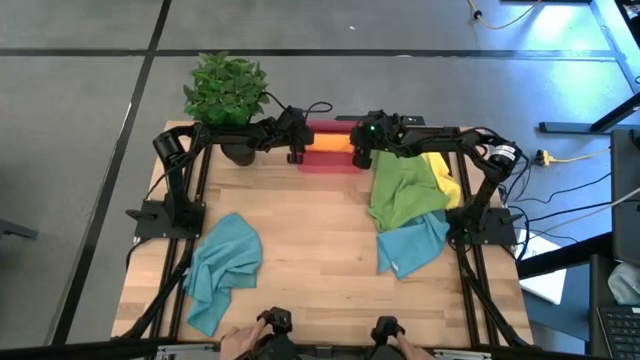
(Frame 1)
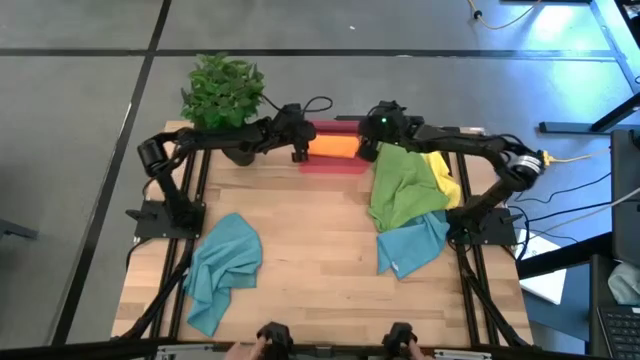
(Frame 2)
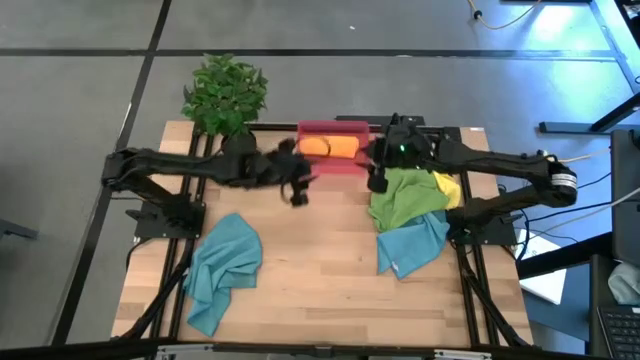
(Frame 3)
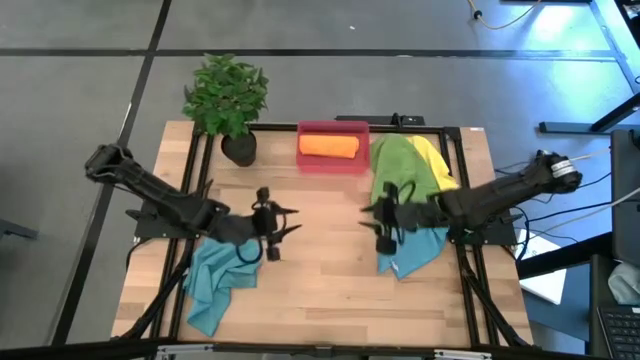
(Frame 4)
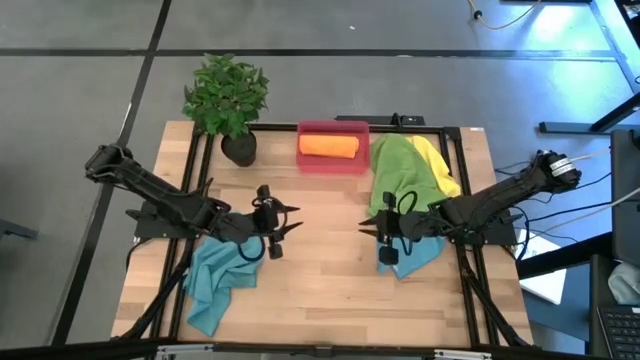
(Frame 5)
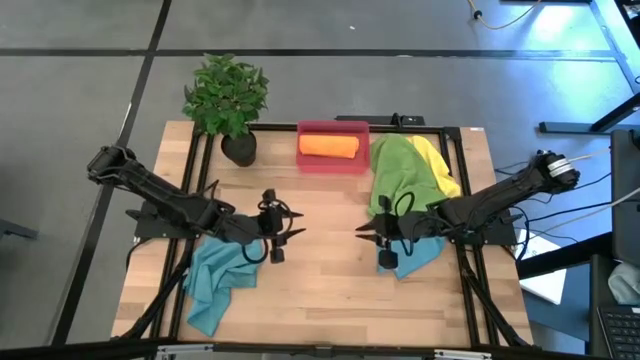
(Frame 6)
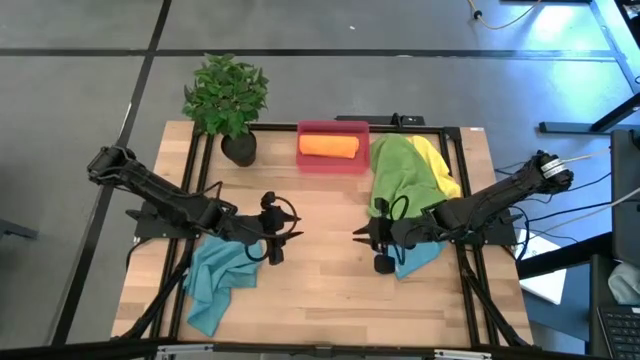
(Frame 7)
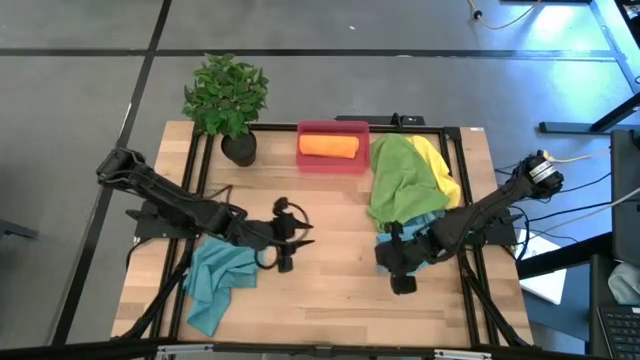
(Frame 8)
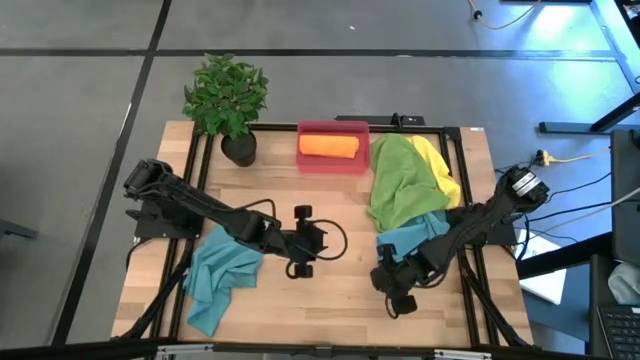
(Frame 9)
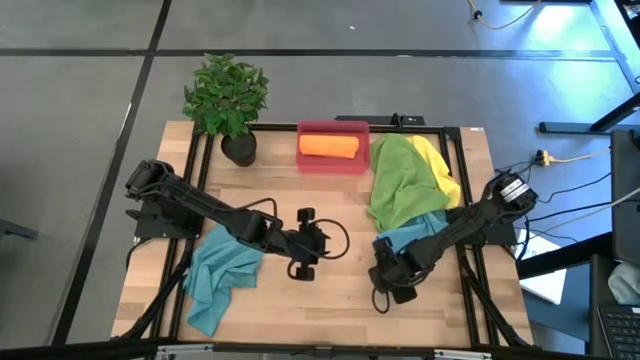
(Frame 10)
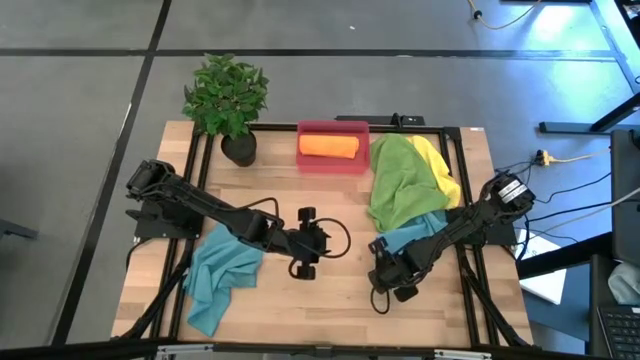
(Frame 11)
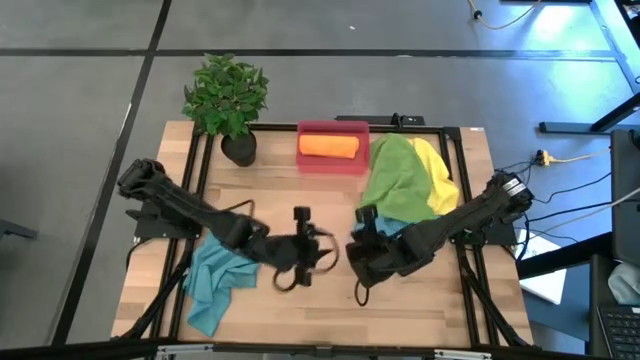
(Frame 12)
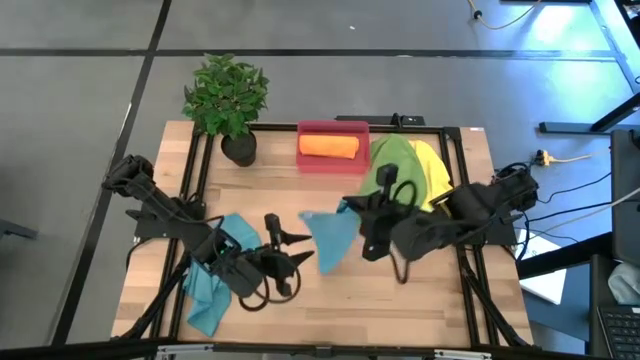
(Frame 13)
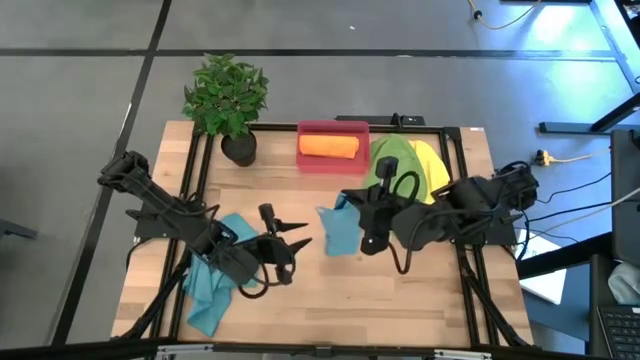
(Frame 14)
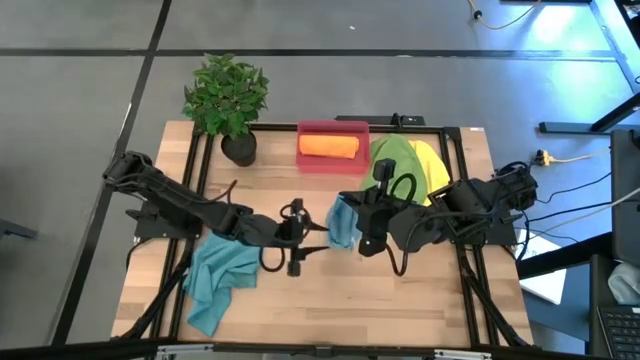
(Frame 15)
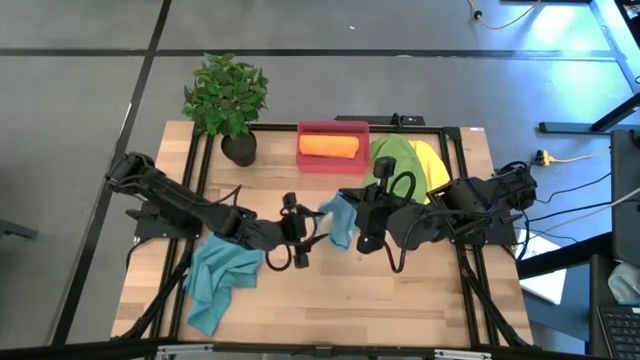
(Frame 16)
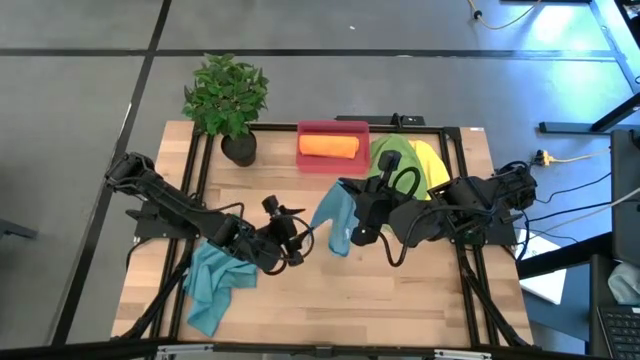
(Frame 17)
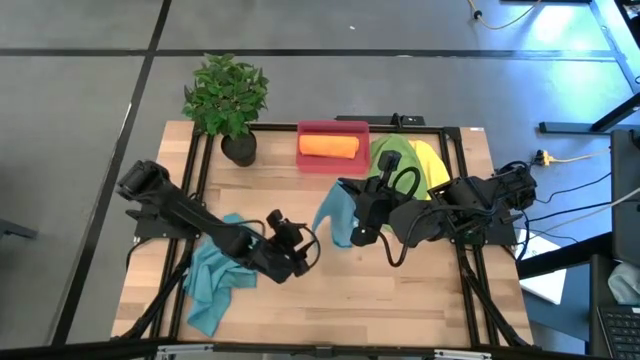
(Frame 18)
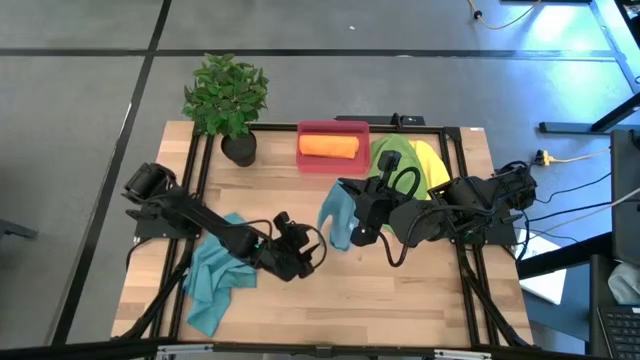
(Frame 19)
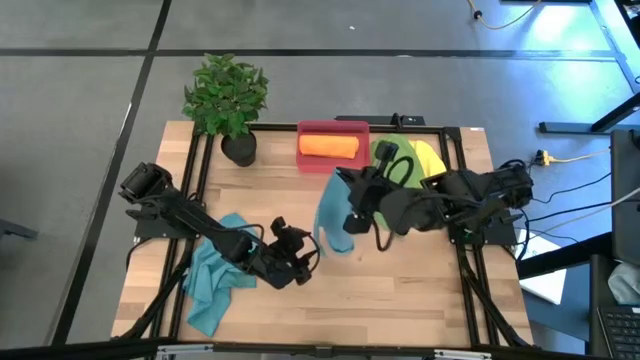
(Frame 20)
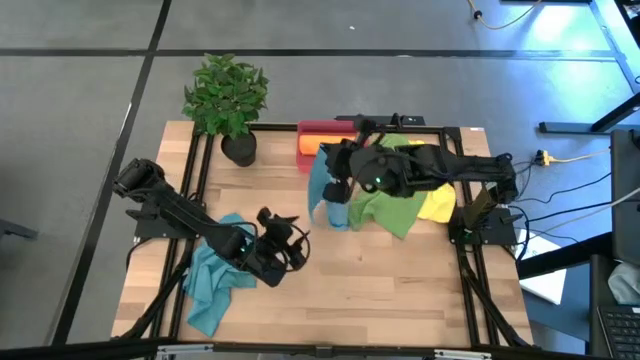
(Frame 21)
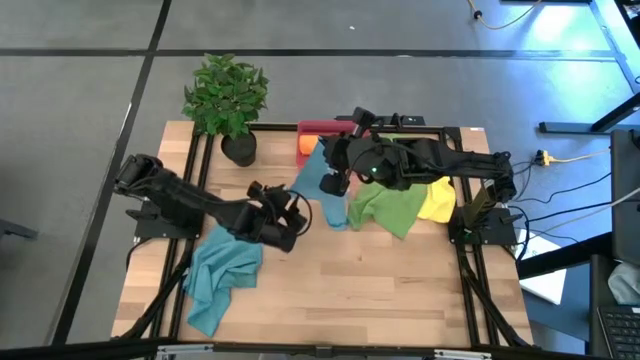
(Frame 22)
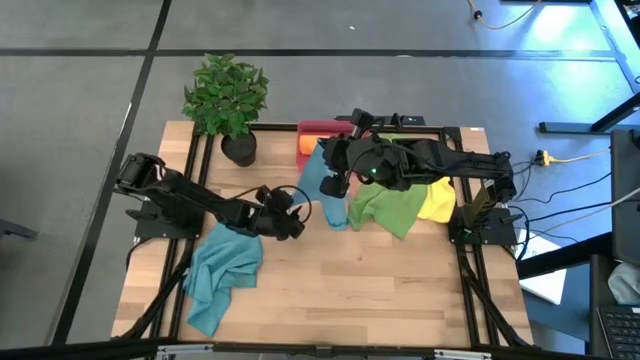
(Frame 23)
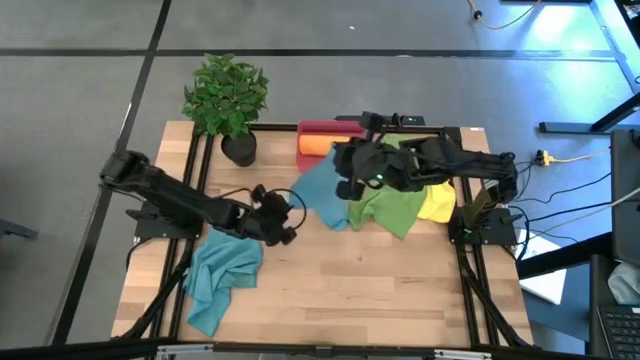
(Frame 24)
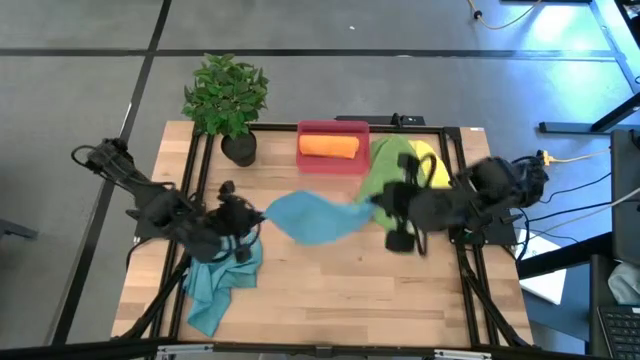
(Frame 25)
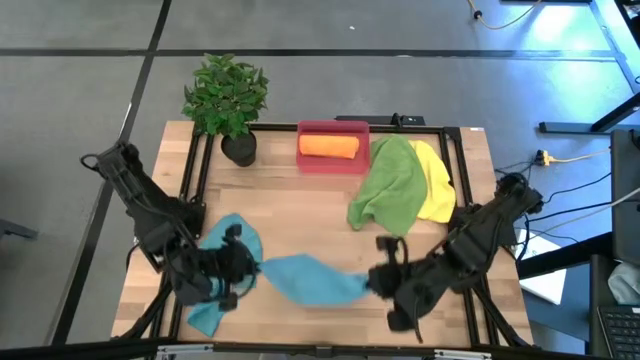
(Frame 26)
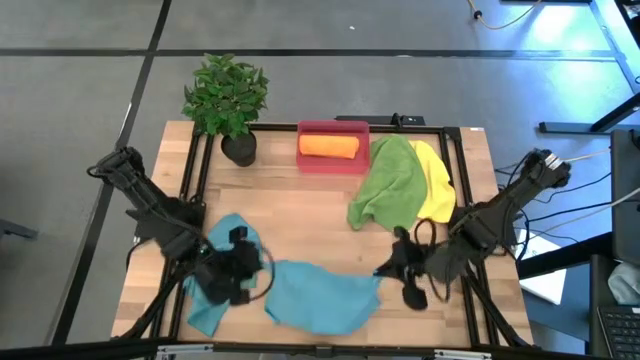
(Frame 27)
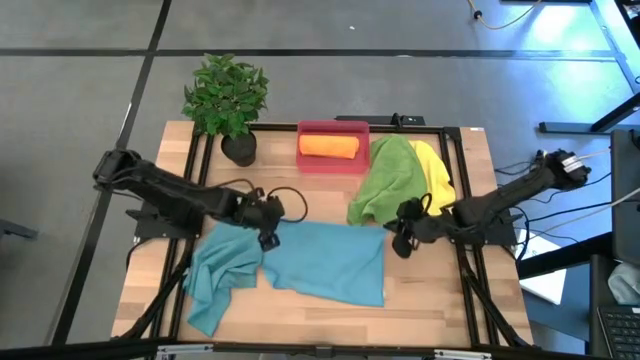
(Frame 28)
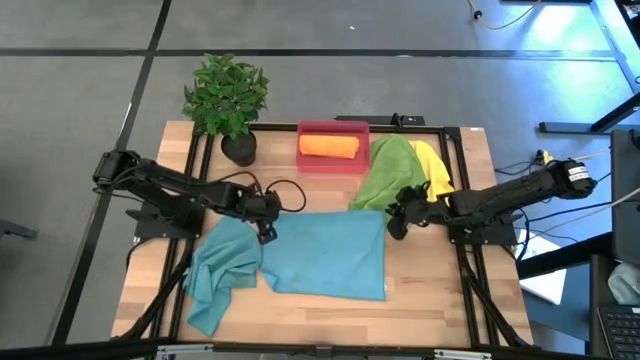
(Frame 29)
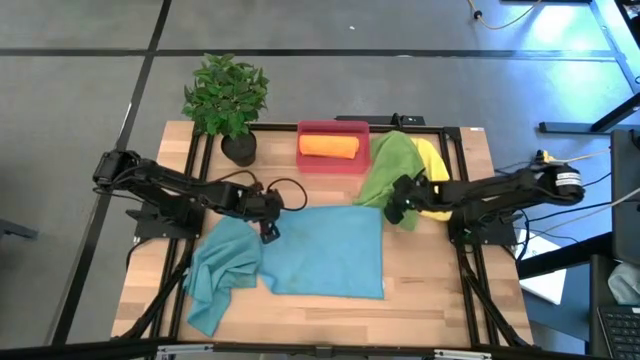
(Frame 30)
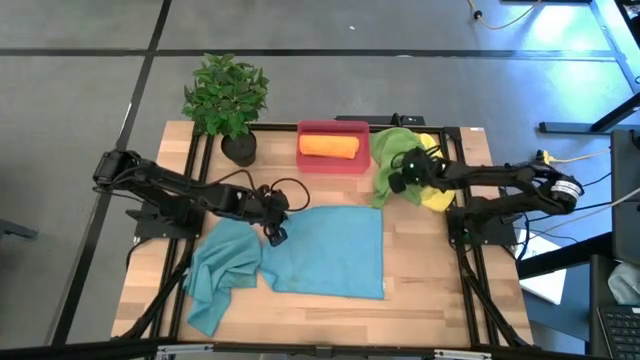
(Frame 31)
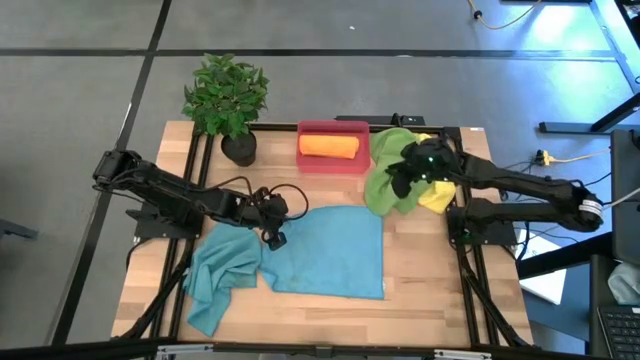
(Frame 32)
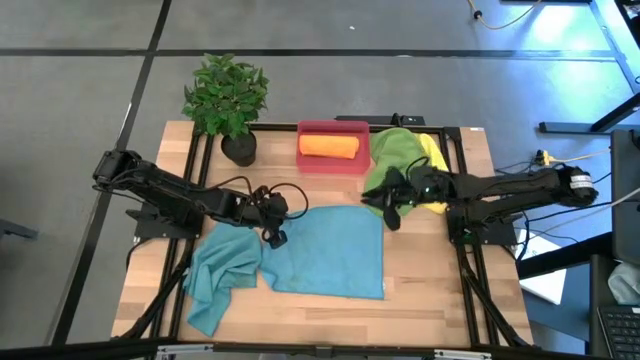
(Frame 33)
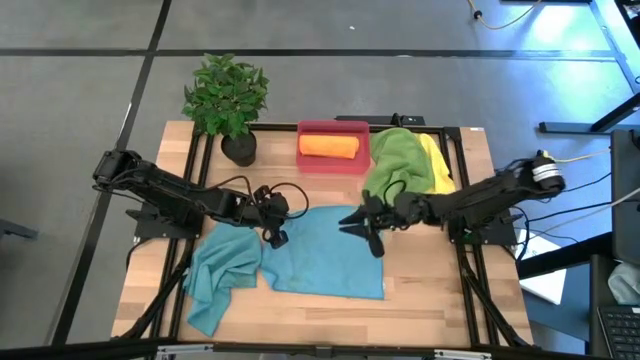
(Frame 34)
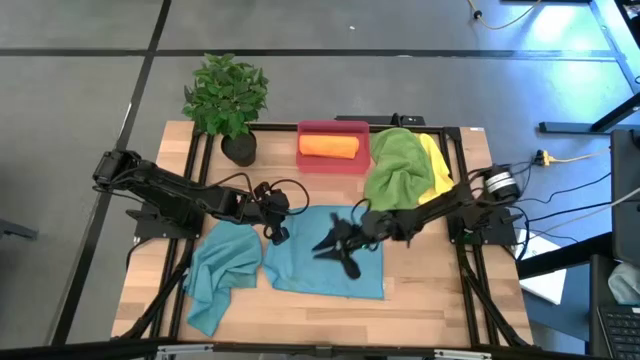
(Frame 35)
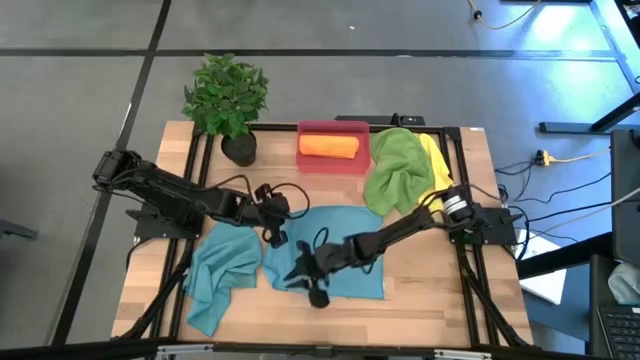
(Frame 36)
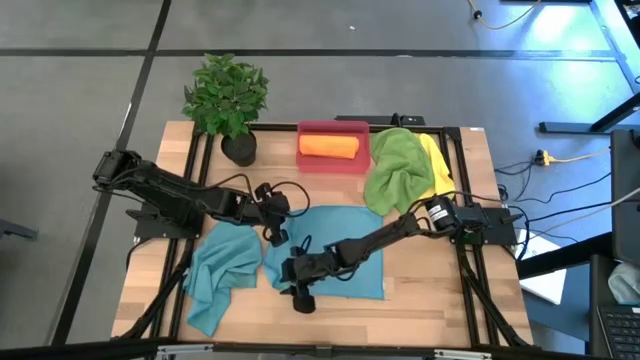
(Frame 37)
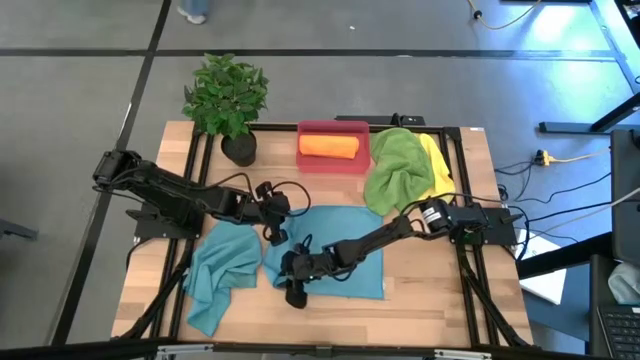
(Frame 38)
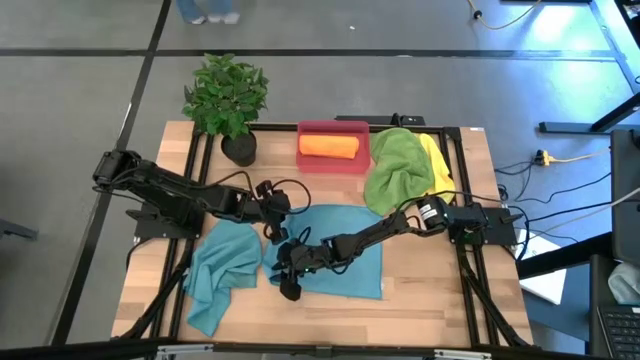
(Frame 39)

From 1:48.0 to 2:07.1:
Task: Roll microfiber towels into tight, uniform cylinder then place into a basket
Fold the right blue towel

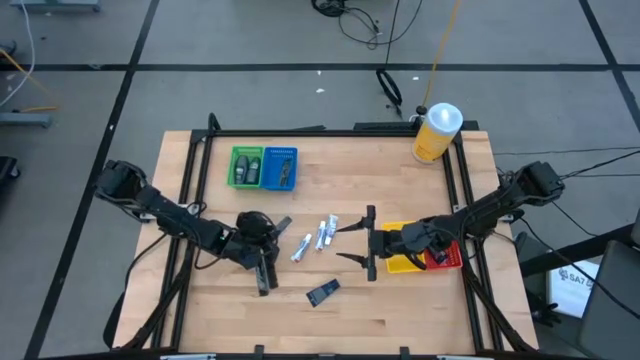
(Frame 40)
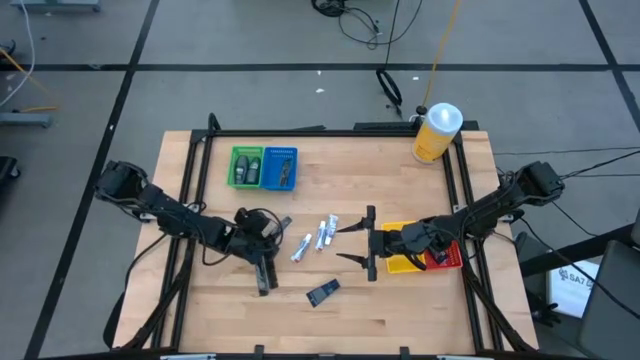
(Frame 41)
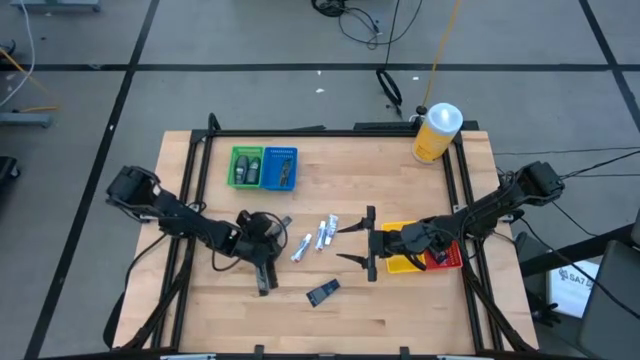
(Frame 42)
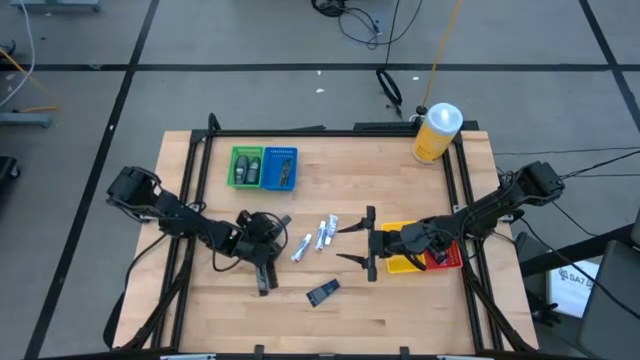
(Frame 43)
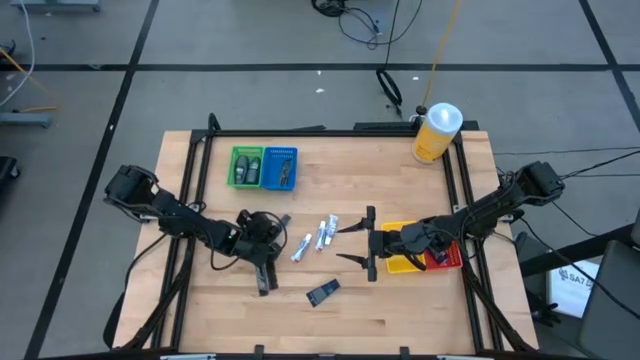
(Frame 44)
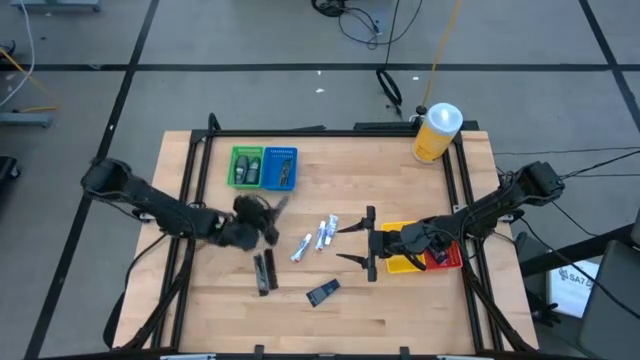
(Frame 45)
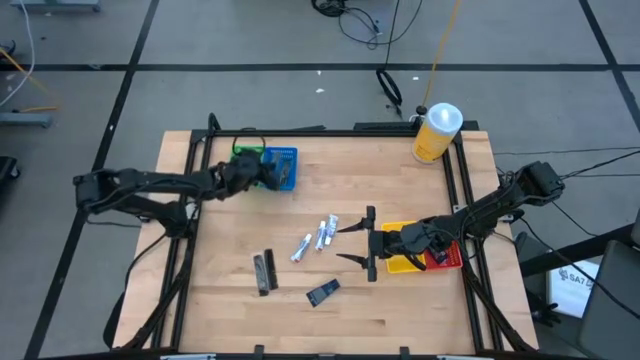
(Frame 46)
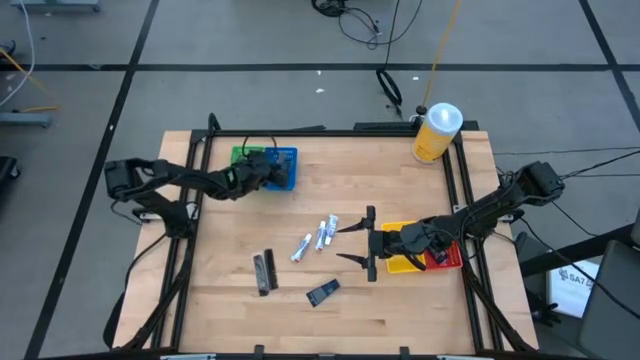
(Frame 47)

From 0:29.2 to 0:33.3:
Task: Pick & Place Travel size toiletries
Put the black comb into the blue bin
